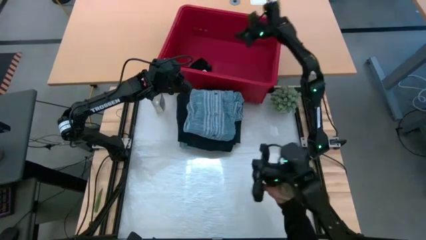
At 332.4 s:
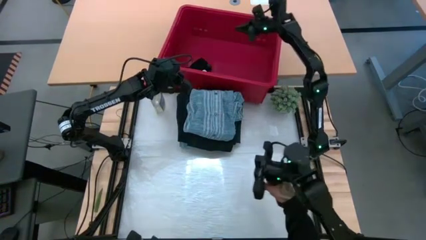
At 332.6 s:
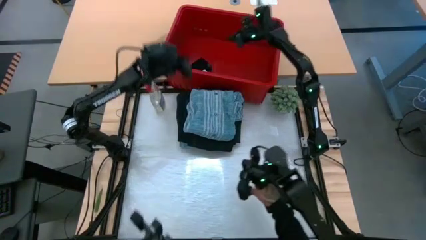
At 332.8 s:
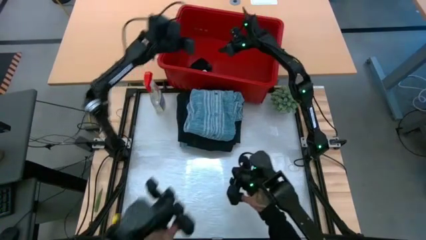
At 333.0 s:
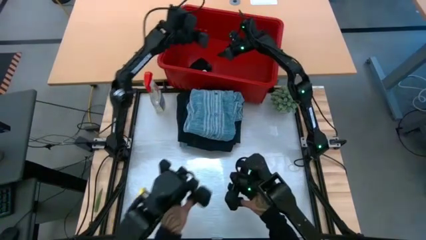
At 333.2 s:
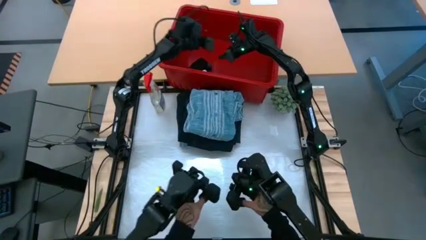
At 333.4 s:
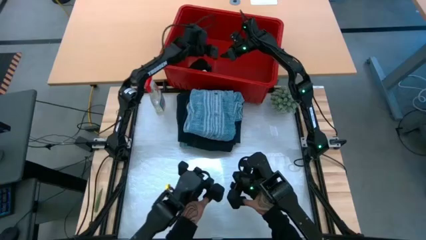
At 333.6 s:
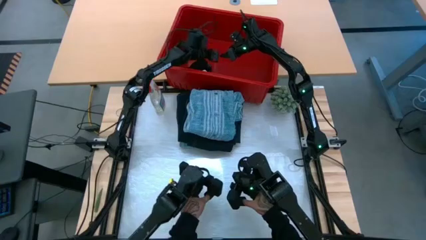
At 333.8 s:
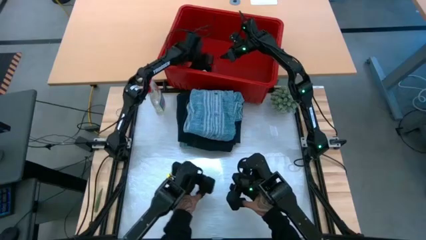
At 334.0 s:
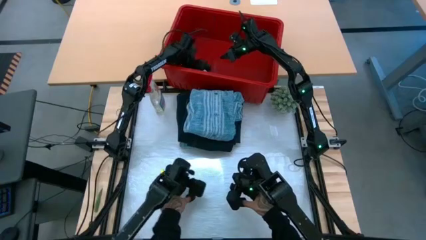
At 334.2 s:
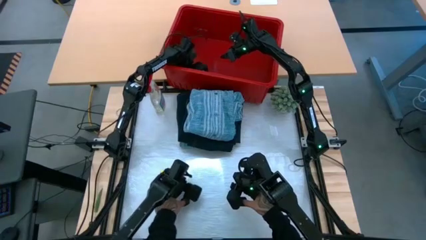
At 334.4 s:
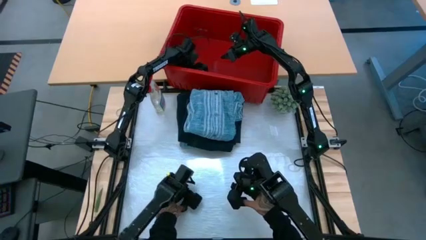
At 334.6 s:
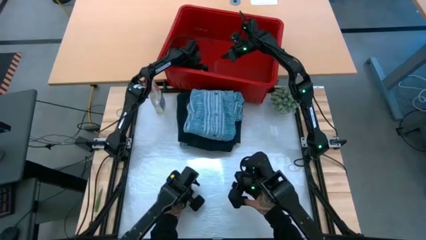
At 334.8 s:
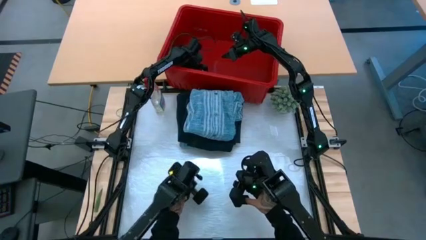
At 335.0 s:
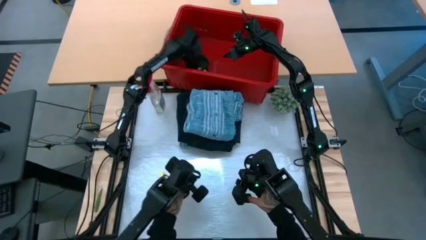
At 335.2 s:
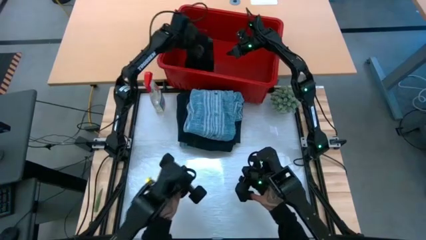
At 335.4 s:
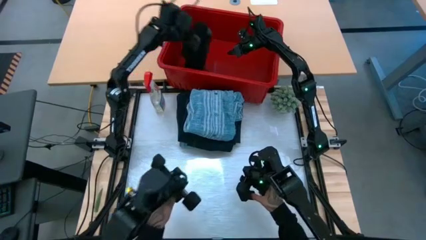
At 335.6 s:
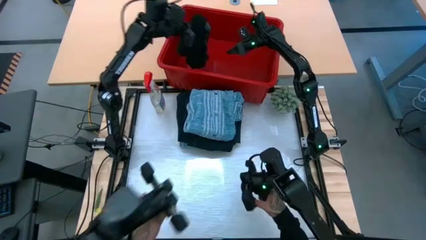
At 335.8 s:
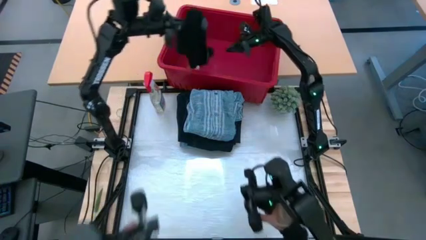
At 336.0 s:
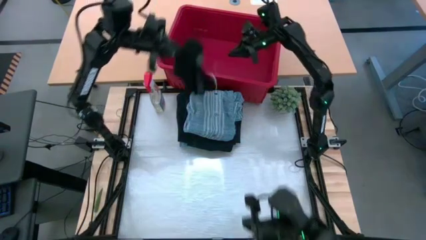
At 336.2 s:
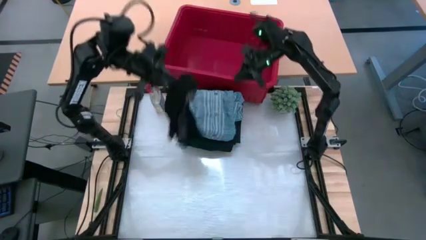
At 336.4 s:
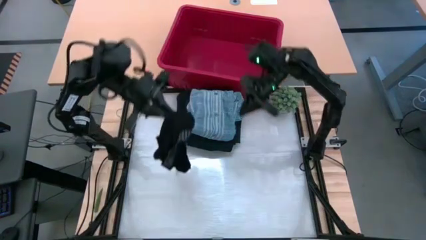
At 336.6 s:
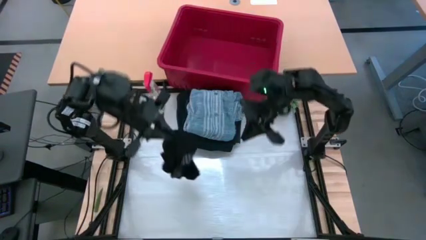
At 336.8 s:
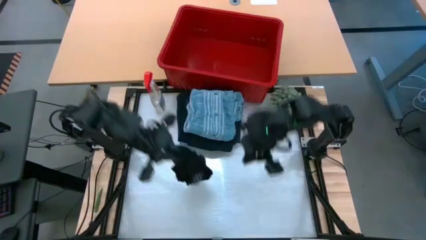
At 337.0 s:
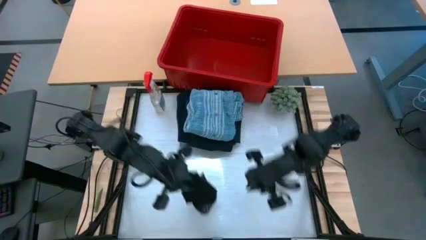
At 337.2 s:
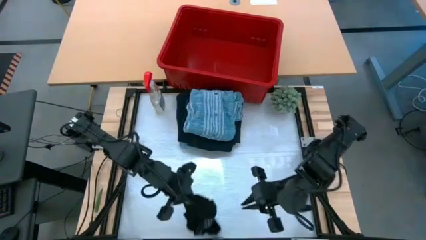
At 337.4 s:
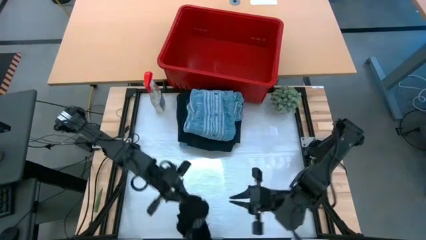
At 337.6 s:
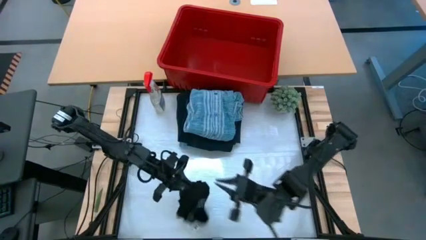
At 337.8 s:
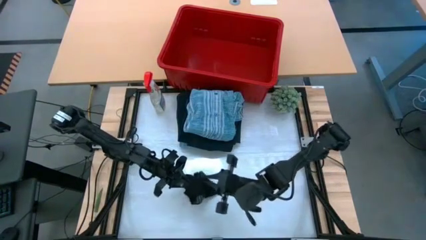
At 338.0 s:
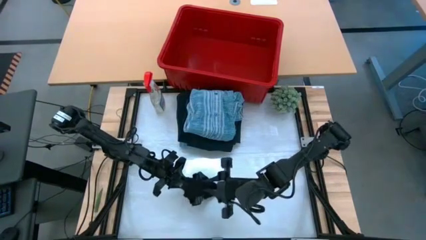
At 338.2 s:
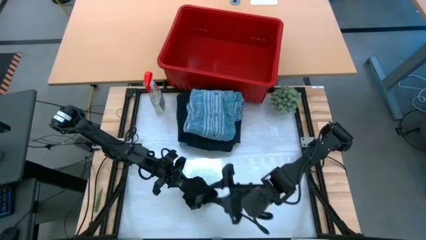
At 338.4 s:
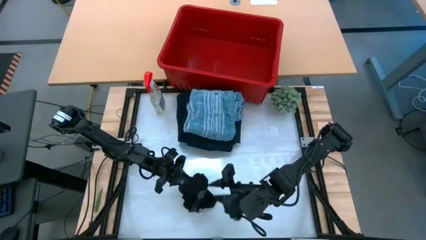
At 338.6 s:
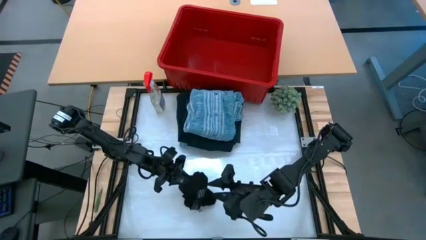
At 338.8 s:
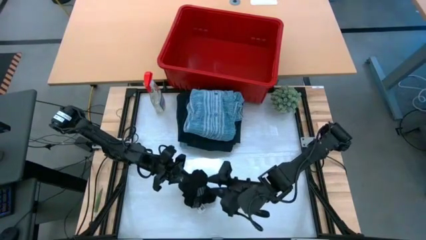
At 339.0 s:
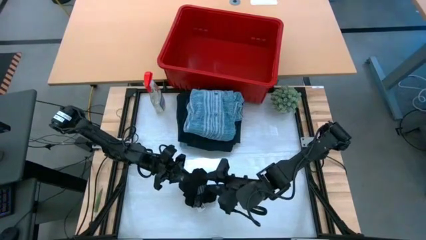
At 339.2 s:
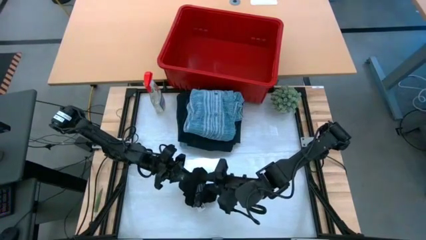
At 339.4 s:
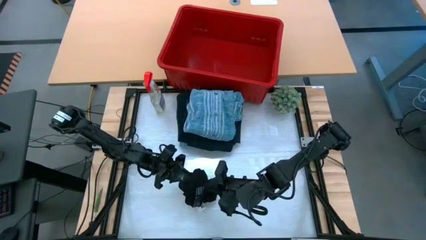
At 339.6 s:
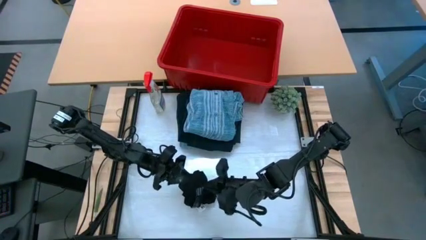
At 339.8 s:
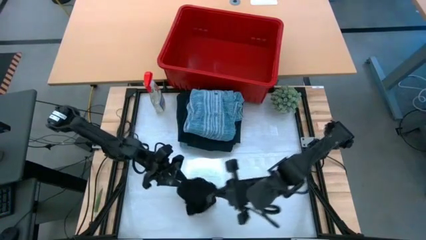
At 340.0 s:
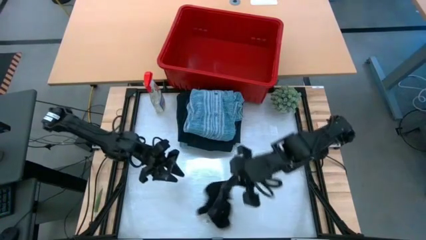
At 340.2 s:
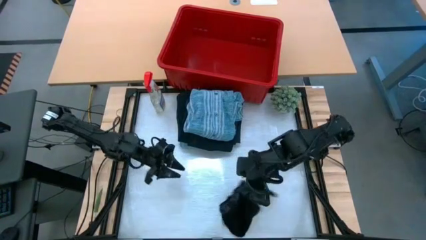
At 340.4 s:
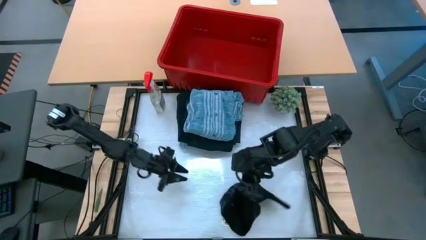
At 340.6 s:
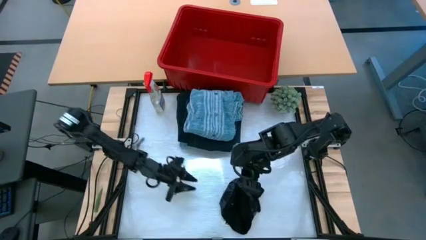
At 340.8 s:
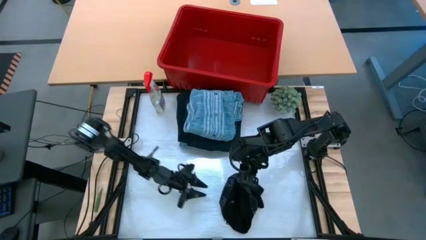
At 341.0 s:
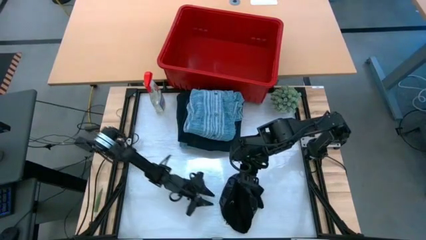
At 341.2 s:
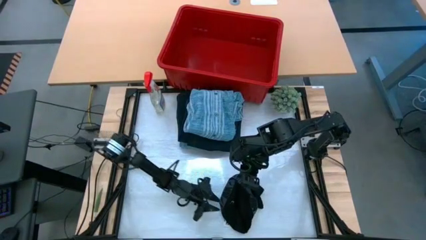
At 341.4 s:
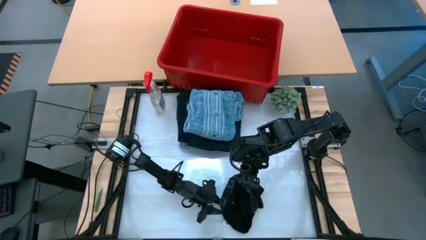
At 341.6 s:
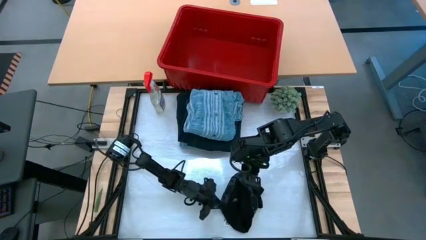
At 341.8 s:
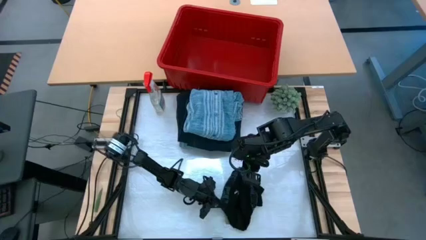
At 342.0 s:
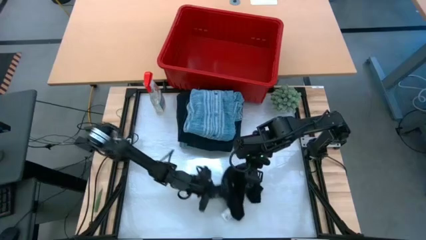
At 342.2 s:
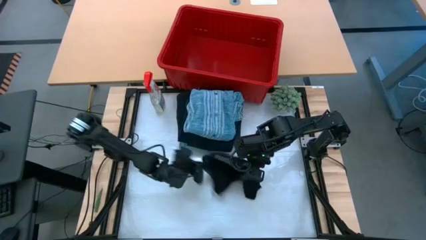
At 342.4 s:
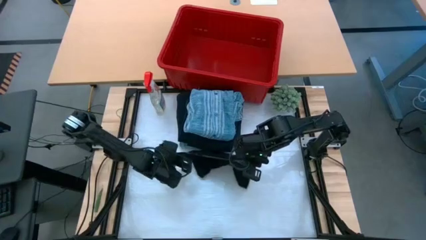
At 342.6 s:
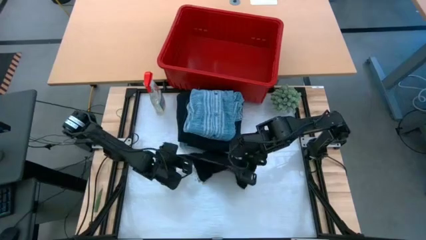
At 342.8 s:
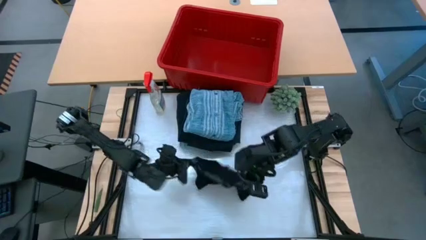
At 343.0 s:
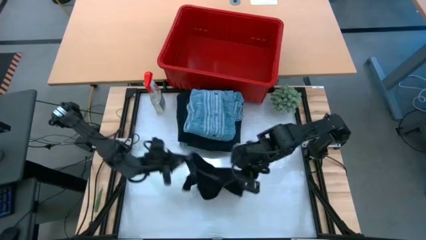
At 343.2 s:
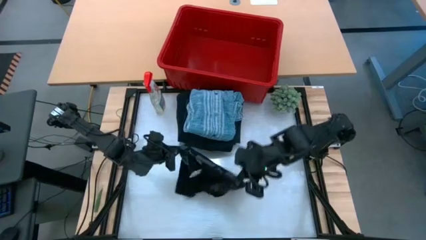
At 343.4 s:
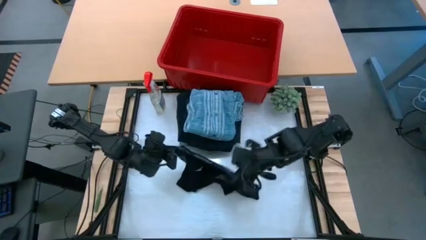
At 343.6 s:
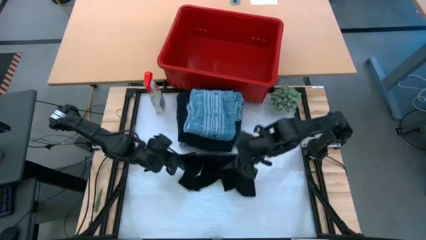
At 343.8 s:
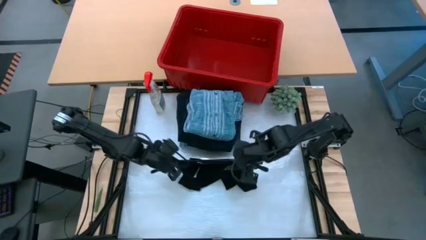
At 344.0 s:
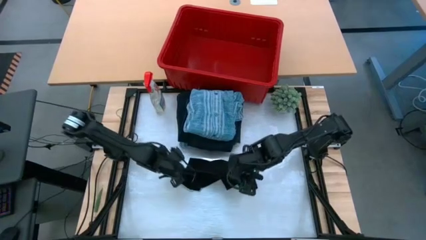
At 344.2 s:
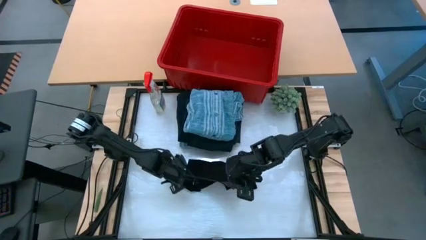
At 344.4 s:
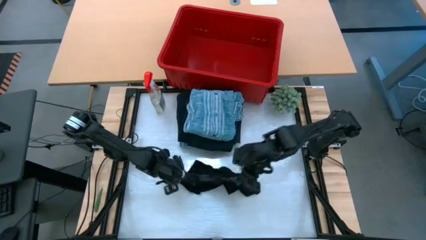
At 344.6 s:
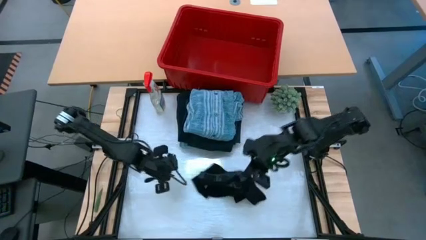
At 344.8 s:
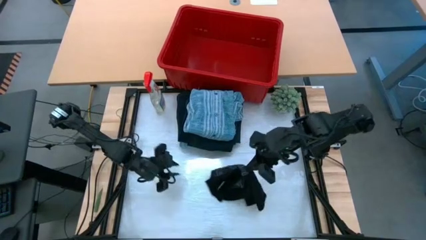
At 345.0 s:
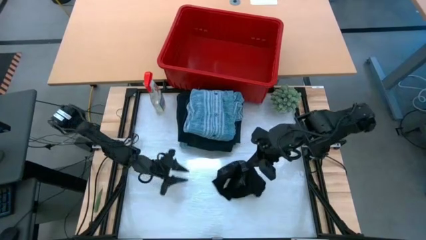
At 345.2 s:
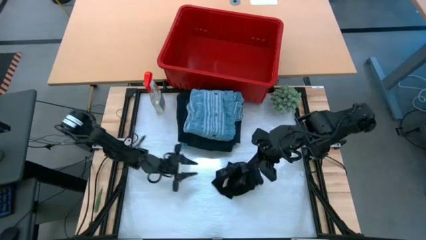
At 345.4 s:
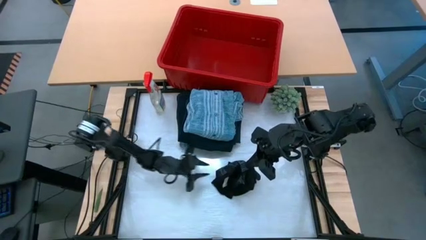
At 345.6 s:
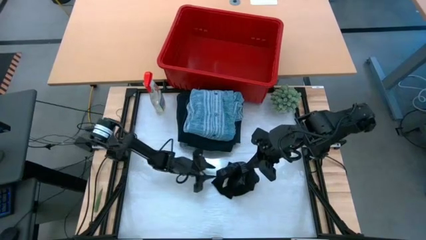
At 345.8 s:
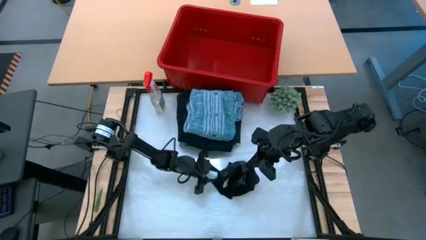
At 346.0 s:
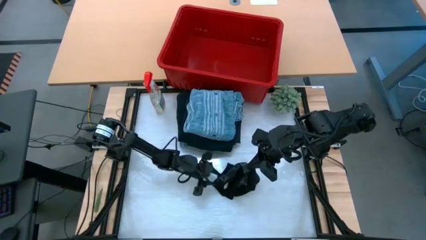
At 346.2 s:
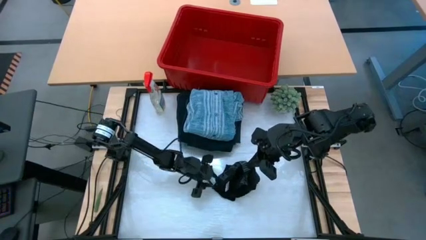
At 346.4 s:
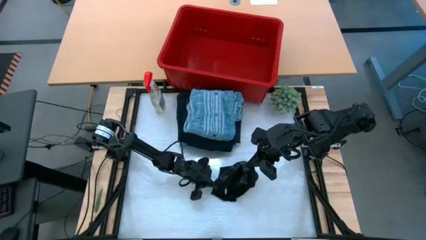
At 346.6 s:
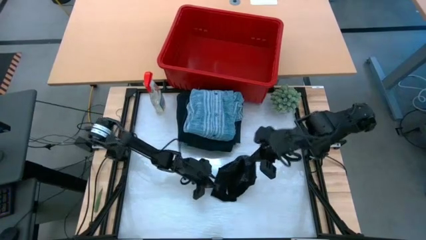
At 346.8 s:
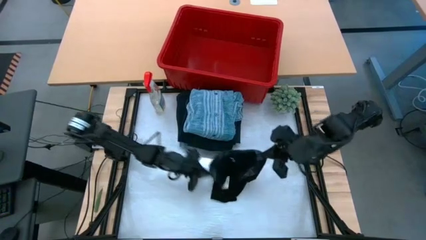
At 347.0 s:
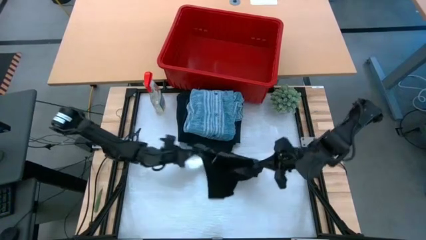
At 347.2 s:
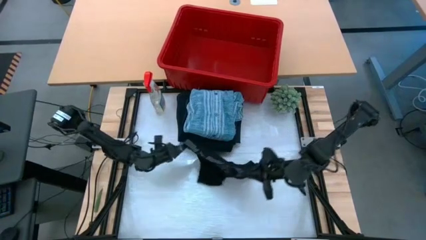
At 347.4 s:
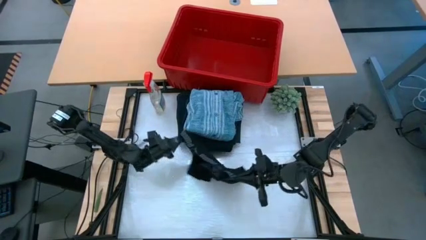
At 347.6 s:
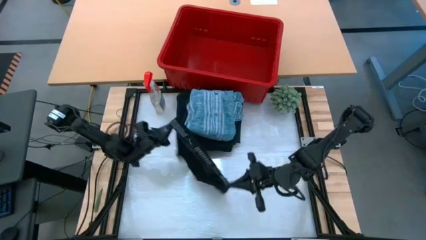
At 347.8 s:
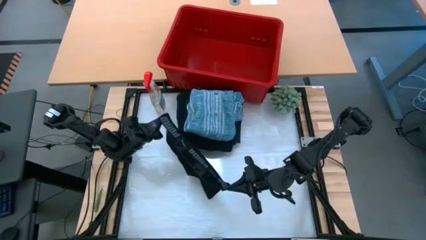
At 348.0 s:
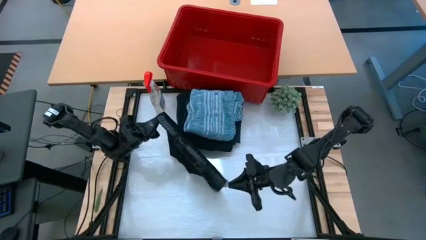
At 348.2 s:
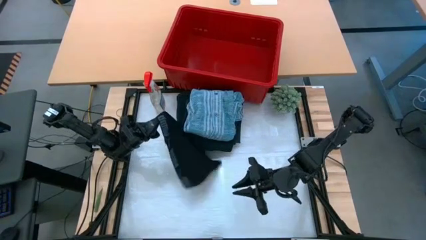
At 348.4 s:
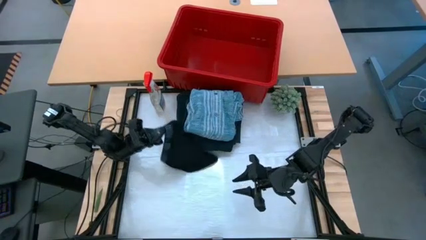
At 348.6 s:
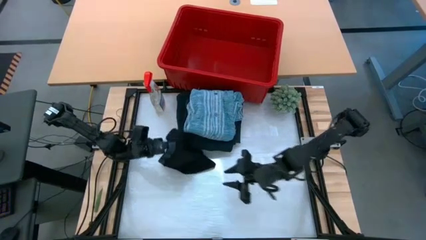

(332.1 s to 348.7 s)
Task: Fold Laundry from Bin
Fold the black underwear from the red laundry
